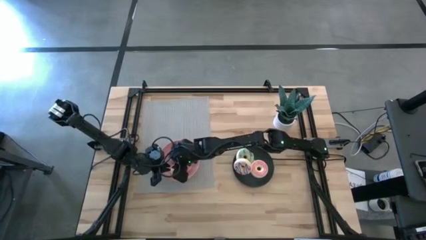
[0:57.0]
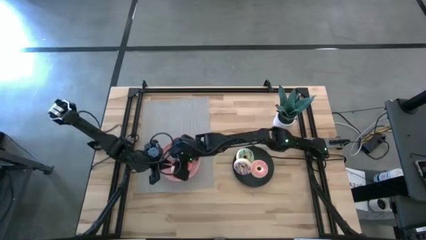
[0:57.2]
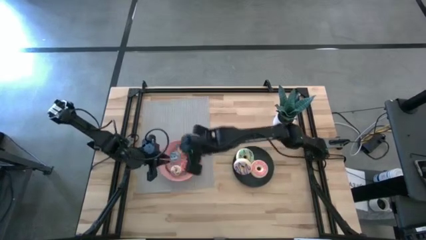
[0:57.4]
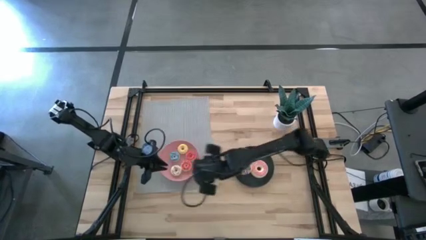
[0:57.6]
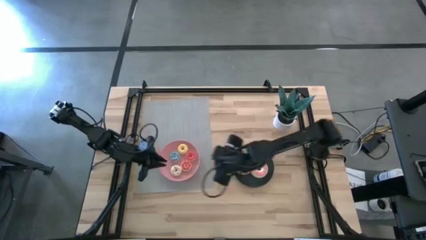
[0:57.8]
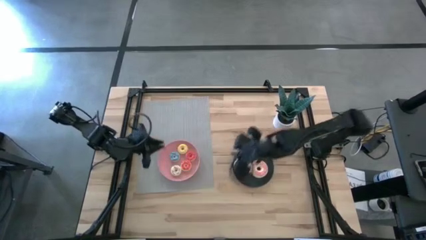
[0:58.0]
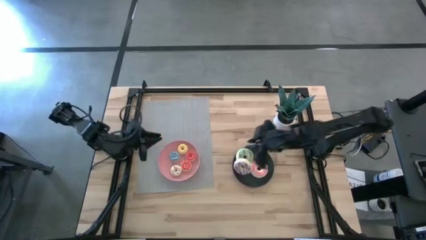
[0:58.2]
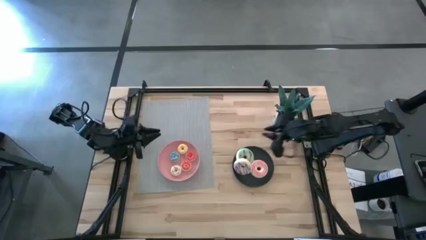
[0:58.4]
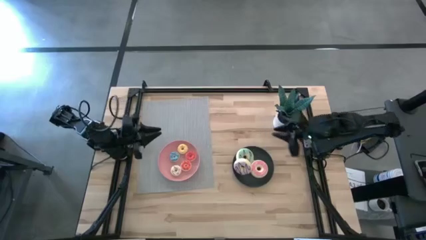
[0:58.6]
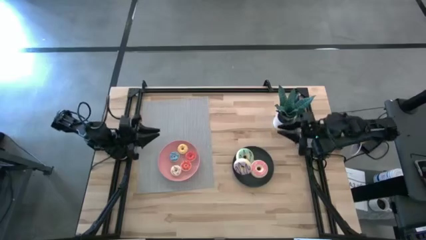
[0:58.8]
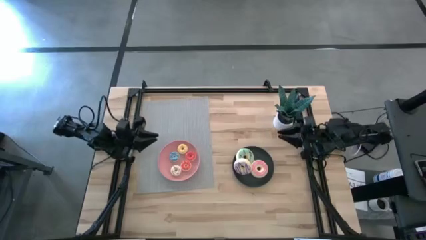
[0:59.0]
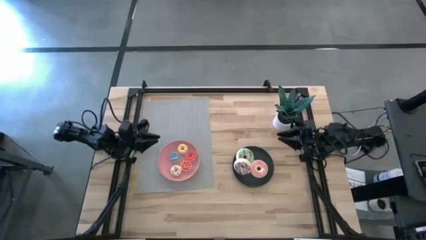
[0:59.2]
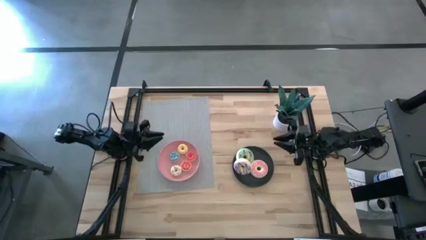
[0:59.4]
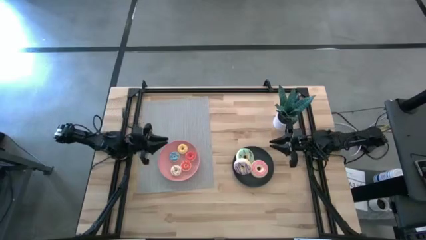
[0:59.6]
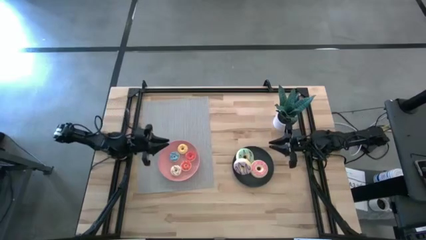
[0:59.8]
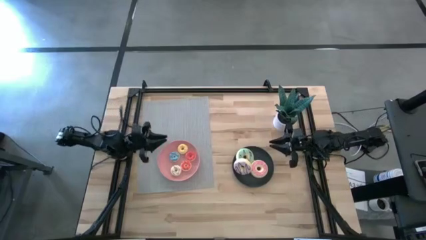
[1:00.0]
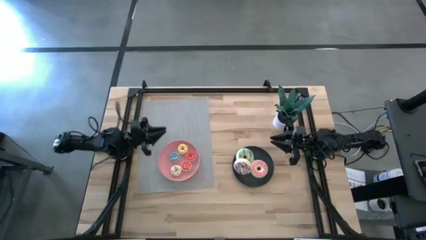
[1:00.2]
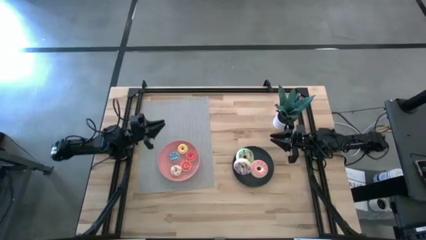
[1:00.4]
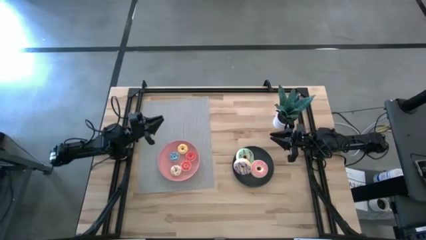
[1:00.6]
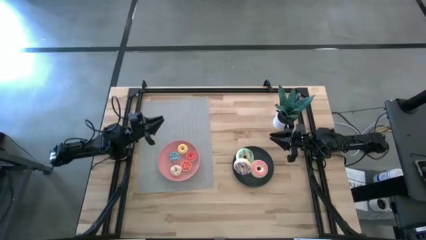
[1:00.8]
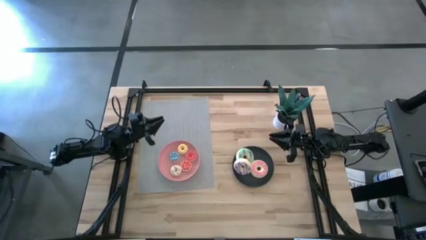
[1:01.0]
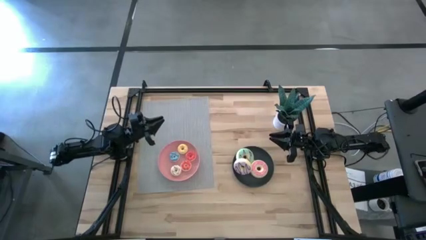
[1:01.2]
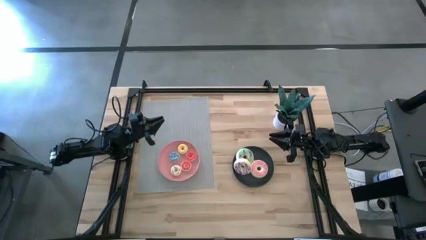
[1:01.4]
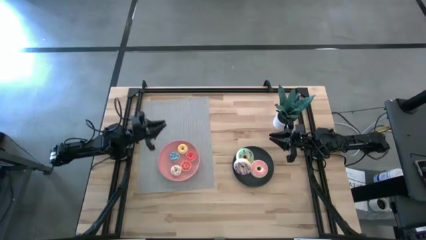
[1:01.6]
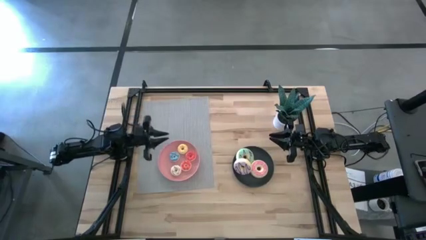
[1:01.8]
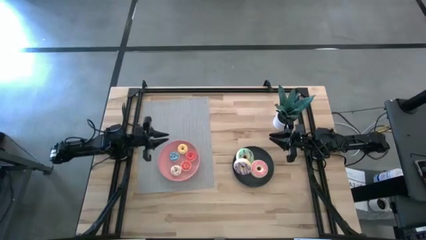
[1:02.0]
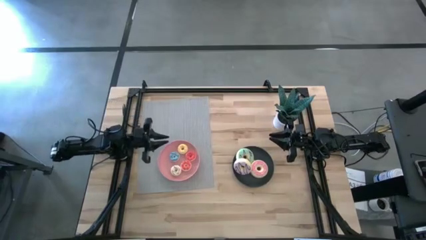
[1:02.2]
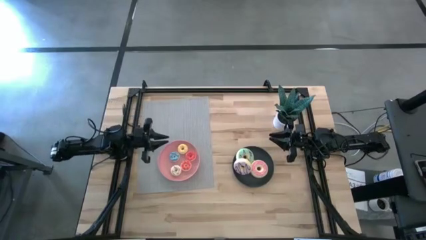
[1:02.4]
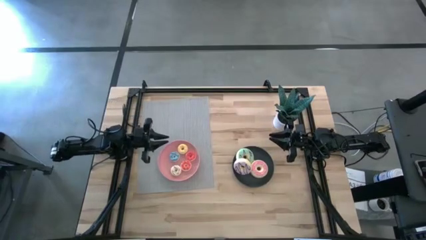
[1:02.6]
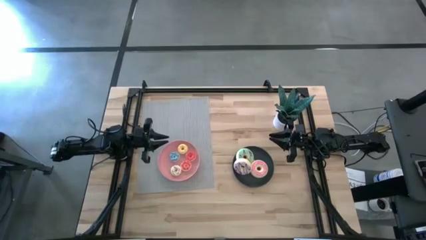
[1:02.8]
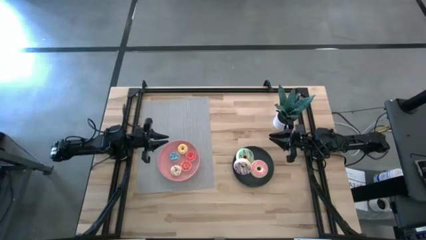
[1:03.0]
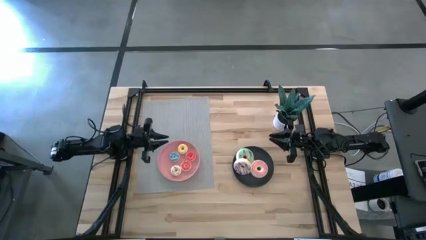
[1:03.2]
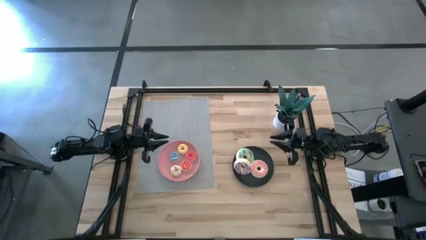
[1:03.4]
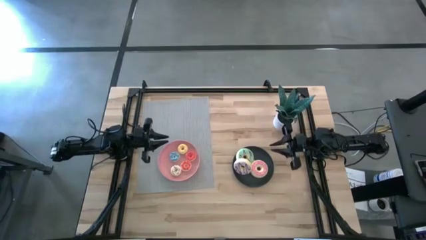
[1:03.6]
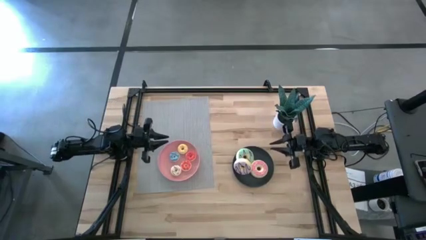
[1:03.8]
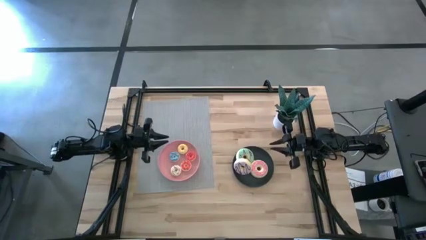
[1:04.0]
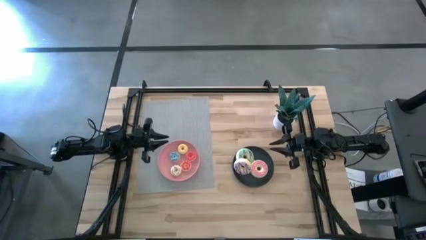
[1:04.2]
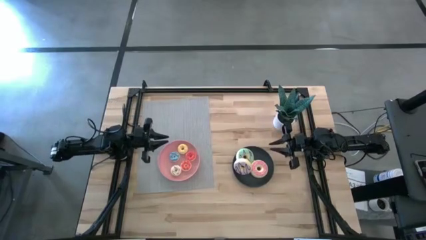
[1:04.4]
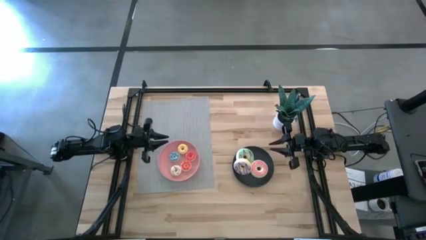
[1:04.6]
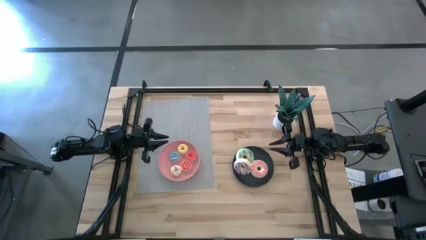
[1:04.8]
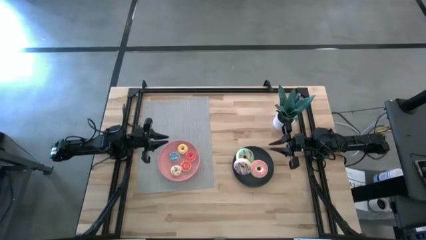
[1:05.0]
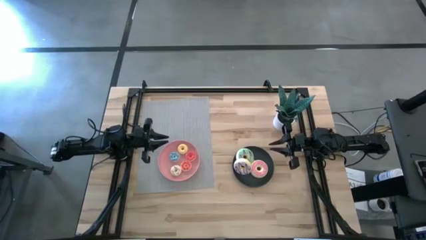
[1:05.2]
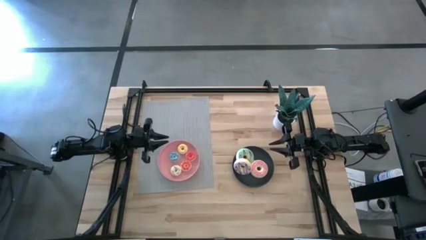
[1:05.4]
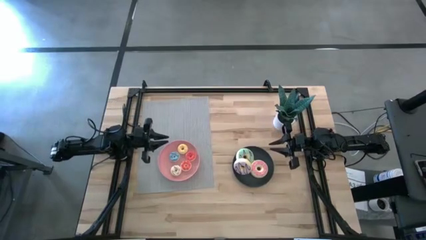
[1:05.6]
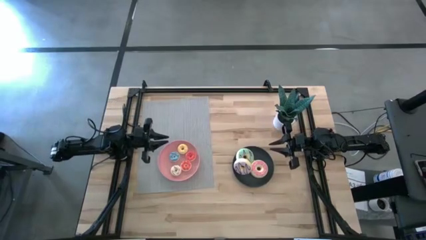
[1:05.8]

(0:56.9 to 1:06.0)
Task: Pick & Place donuts
Return to Home Position

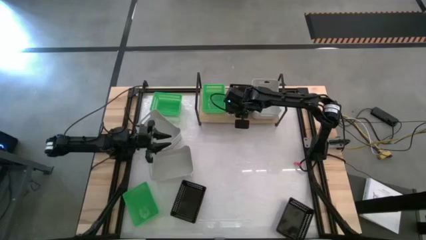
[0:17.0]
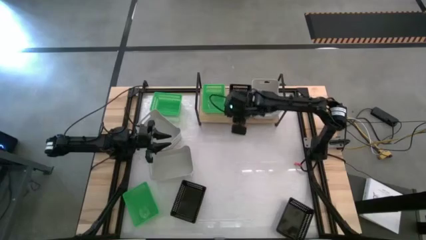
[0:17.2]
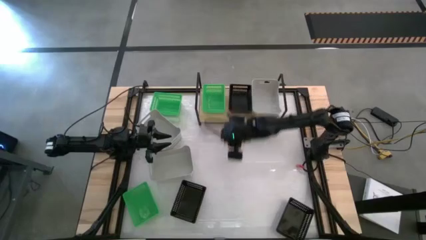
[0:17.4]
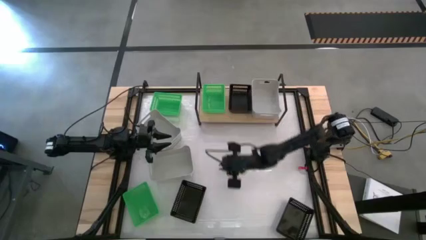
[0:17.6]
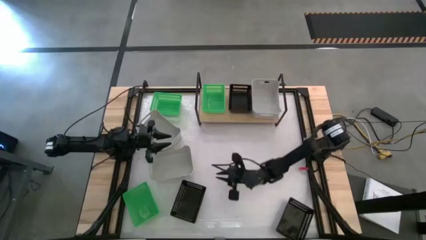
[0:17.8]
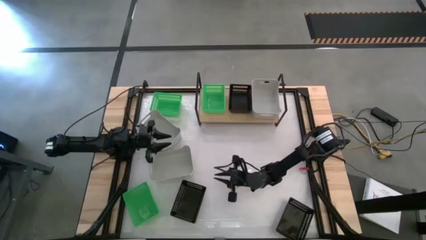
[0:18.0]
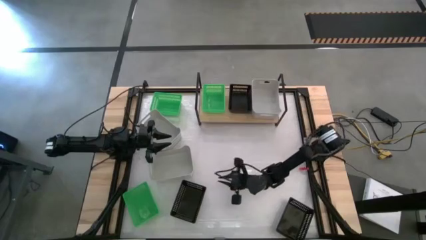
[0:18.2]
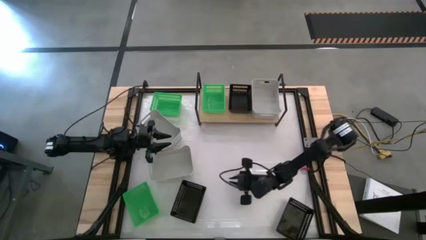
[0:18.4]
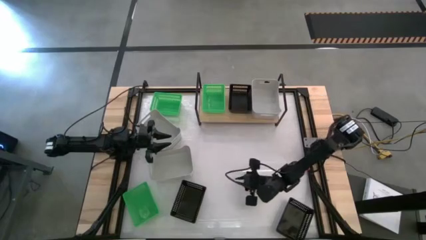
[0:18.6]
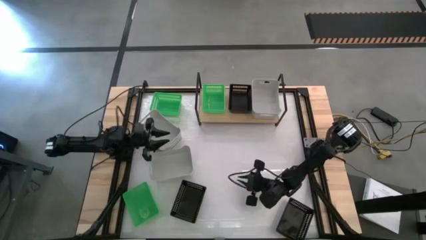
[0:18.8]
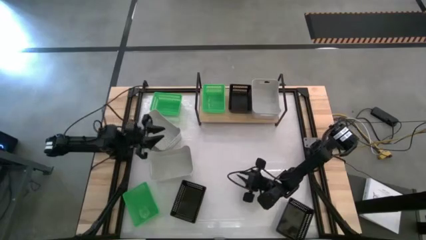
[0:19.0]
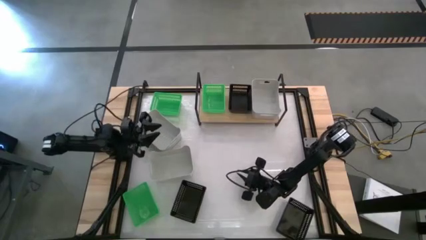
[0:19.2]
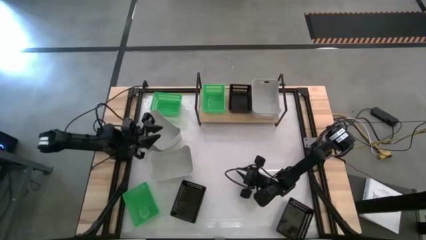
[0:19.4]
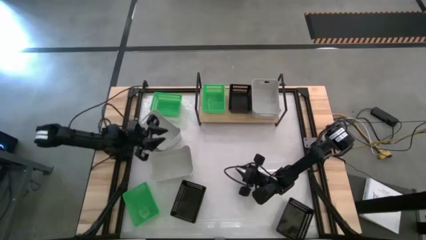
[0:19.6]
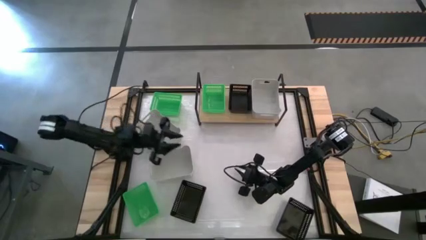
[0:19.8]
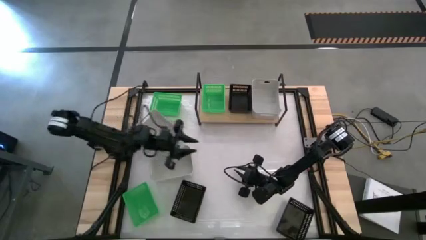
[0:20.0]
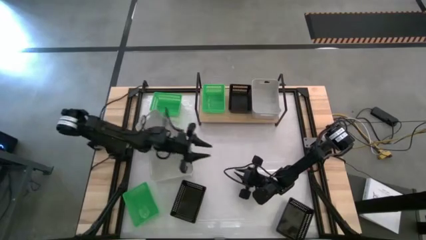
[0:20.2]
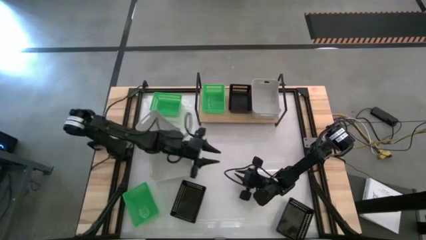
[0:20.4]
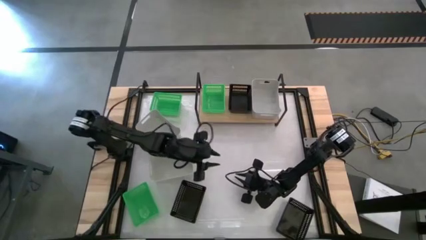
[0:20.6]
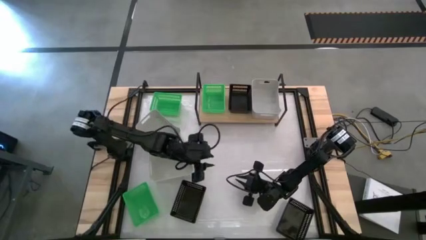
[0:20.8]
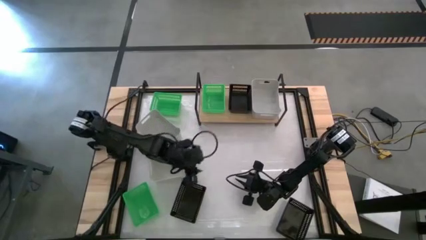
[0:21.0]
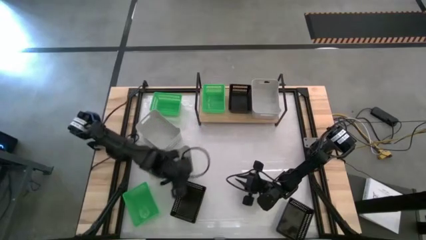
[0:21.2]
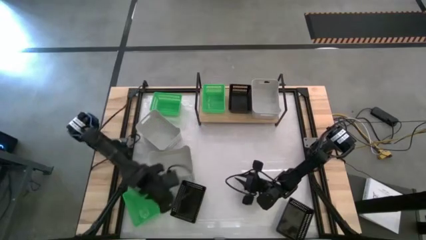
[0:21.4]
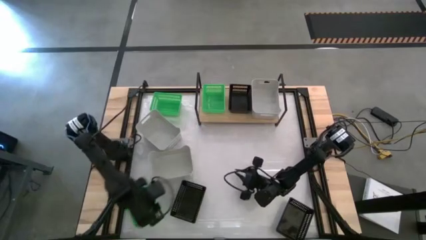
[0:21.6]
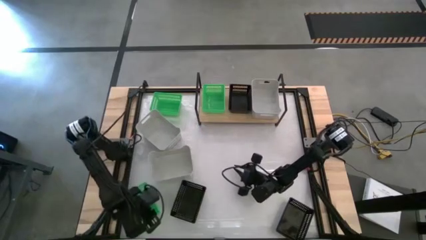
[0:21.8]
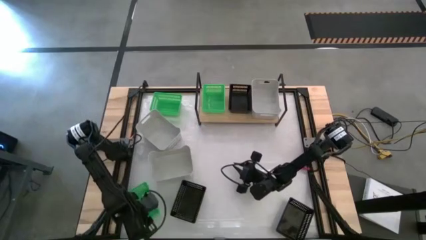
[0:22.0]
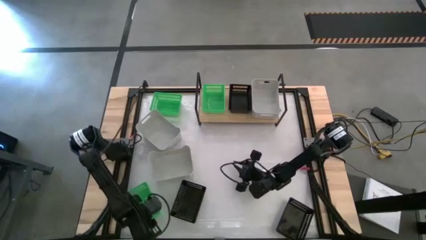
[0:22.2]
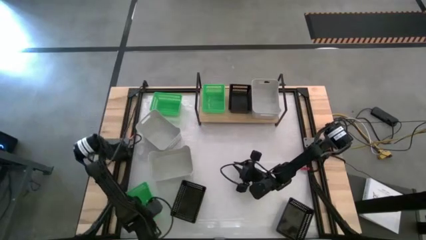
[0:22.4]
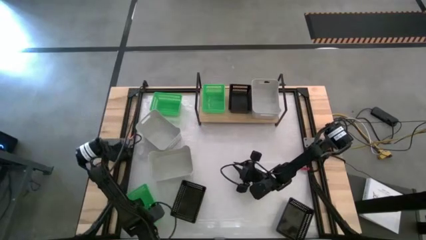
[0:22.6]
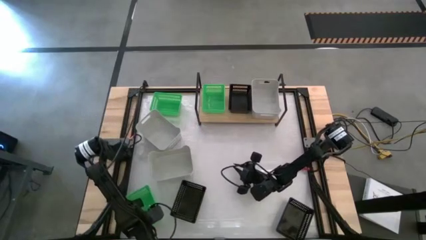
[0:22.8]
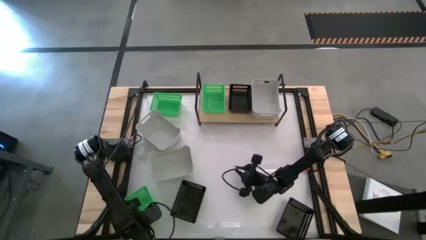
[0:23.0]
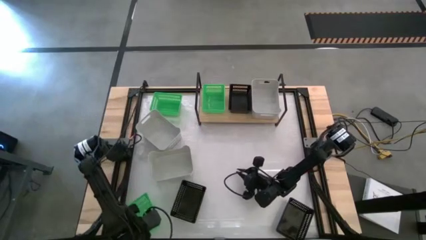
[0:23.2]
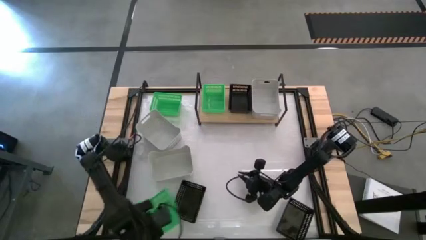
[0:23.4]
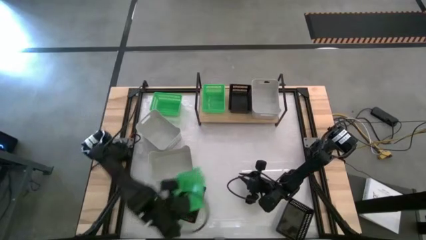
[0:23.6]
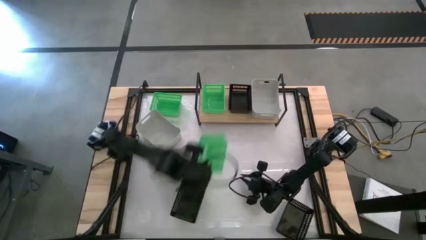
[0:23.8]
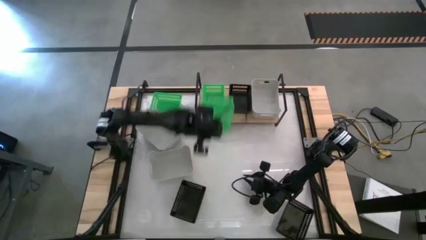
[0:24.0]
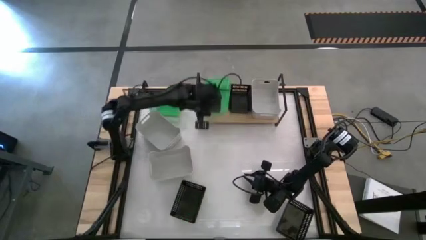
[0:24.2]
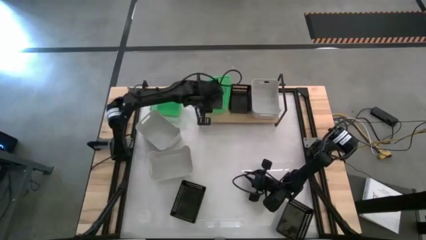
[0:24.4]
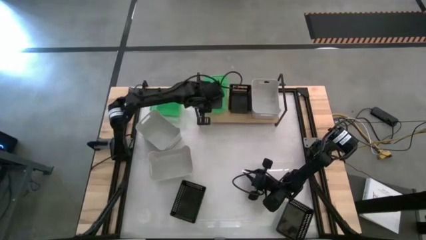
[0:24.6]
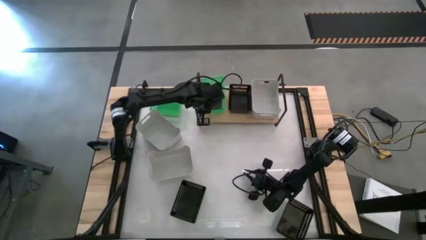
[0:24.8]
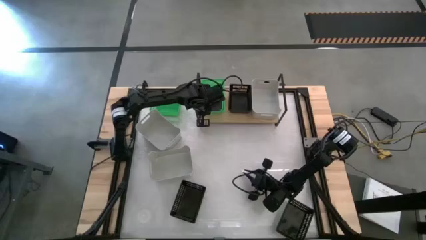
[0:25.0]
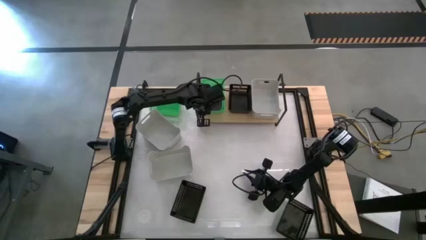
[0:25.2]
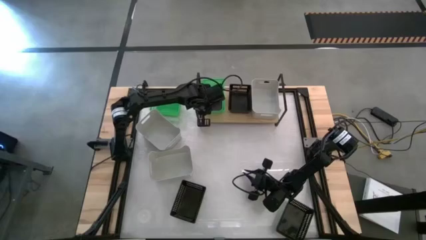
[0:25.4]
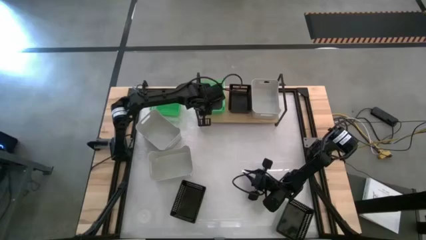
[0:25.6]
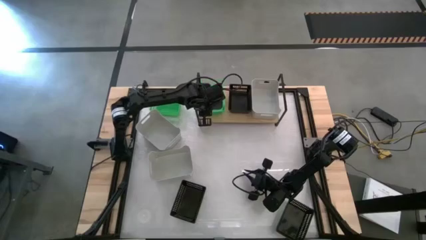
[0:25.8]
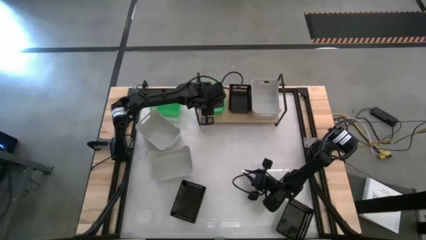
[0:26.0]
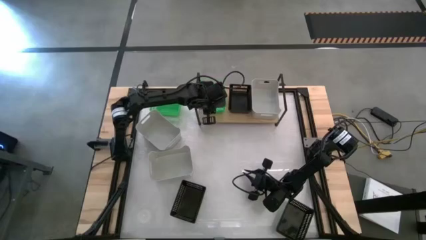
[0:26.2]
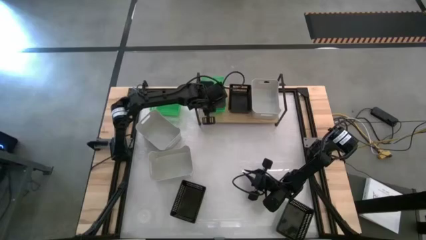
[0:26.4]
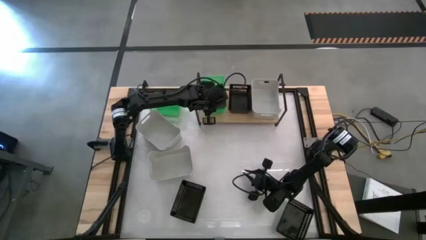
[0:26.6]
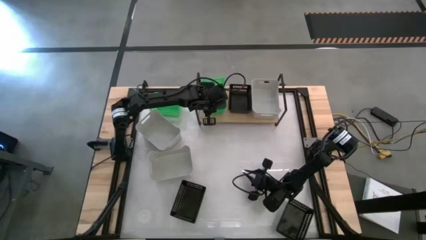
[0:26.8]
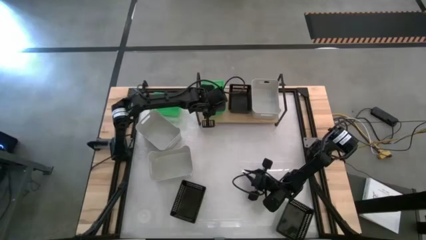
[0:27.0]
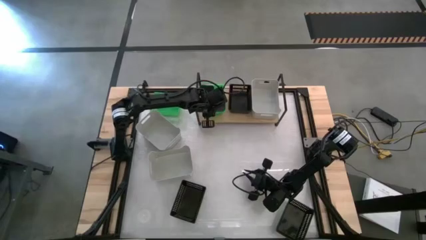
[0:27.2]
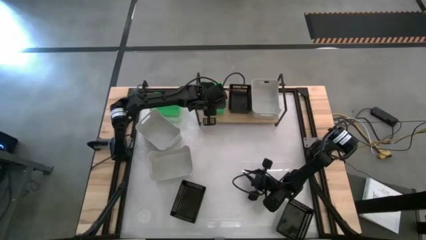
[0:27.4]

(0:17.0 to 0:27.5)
Task: Stack baskets on shelf by color
Stack the bottom green bin on top of the other green bin on the shelf
